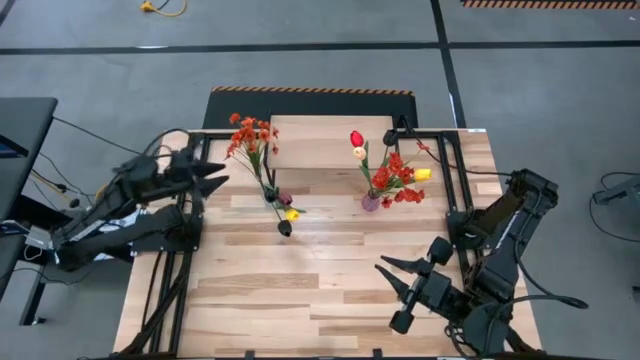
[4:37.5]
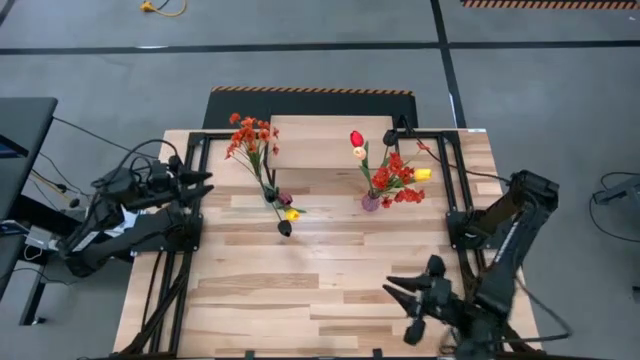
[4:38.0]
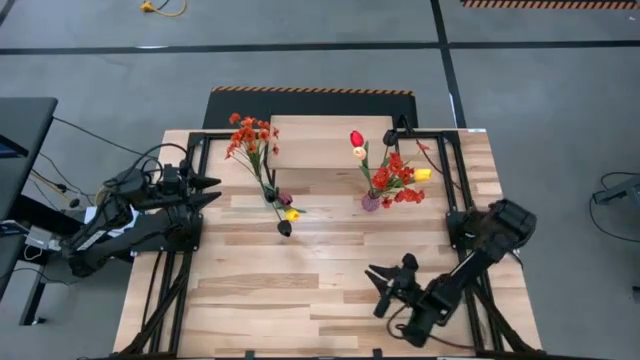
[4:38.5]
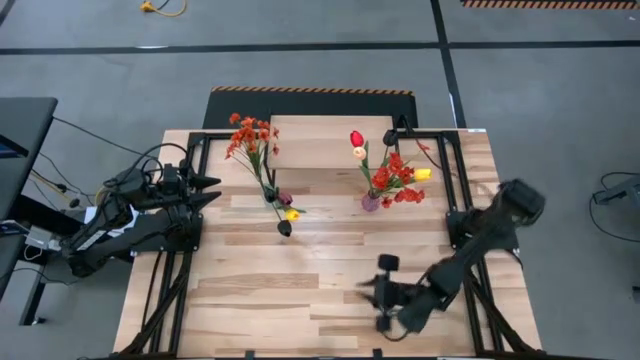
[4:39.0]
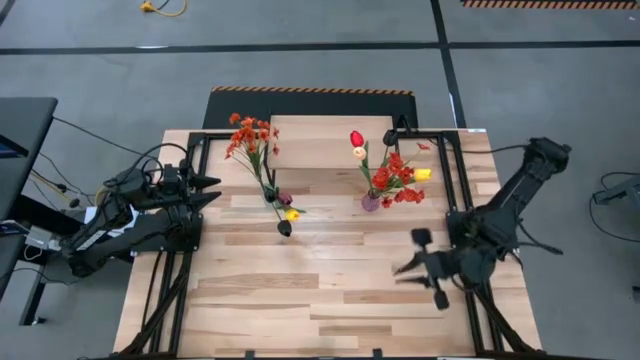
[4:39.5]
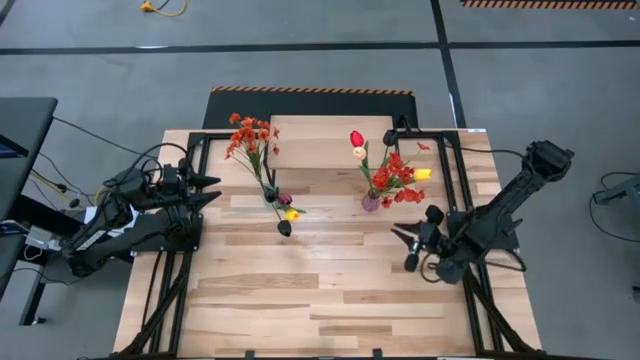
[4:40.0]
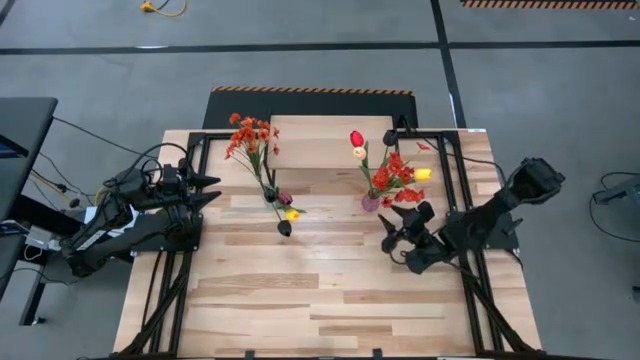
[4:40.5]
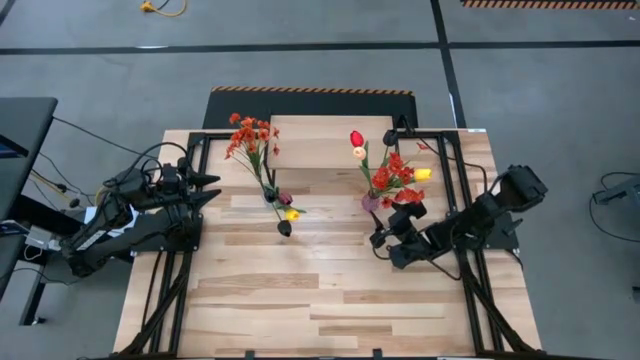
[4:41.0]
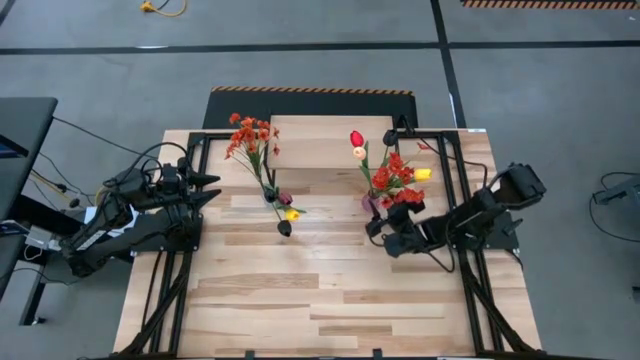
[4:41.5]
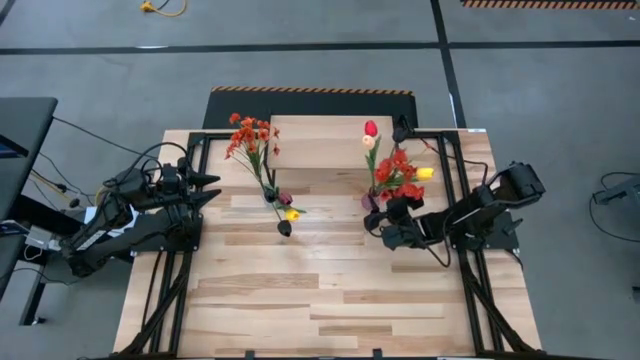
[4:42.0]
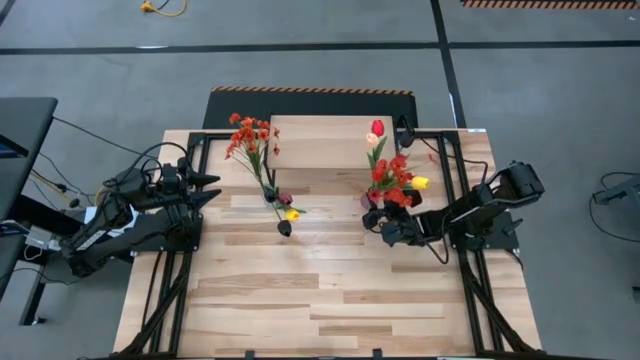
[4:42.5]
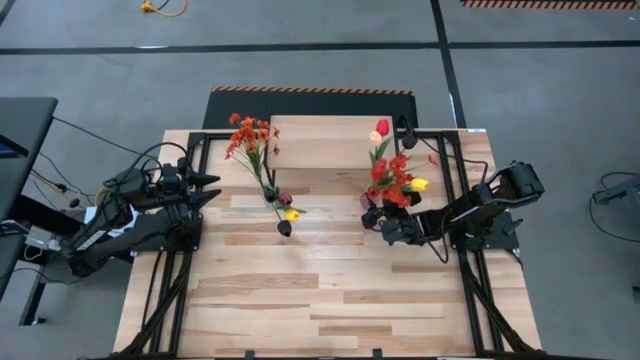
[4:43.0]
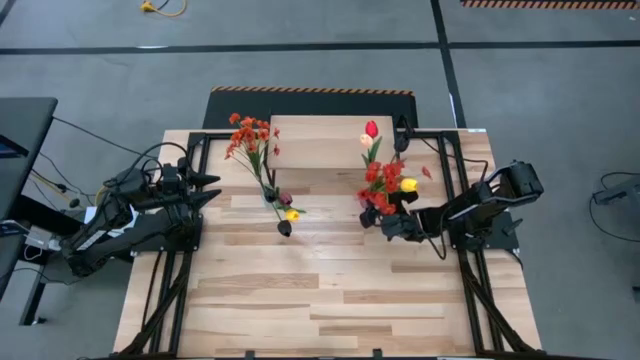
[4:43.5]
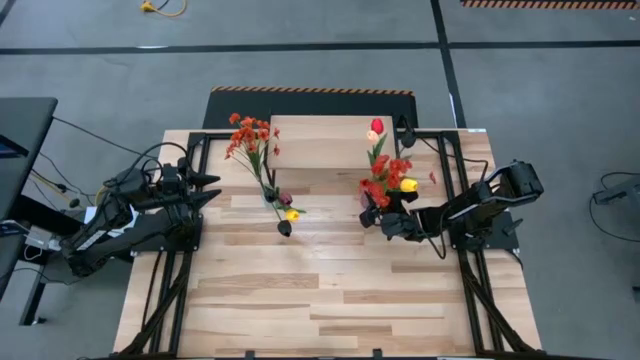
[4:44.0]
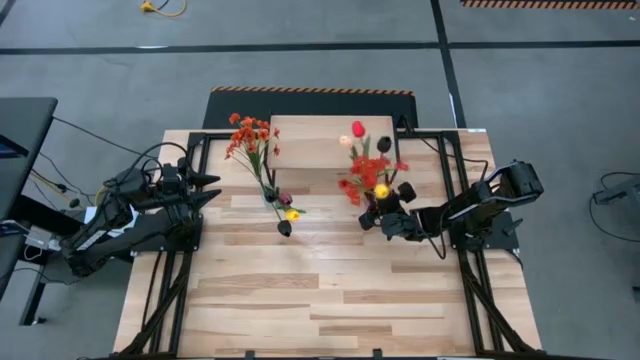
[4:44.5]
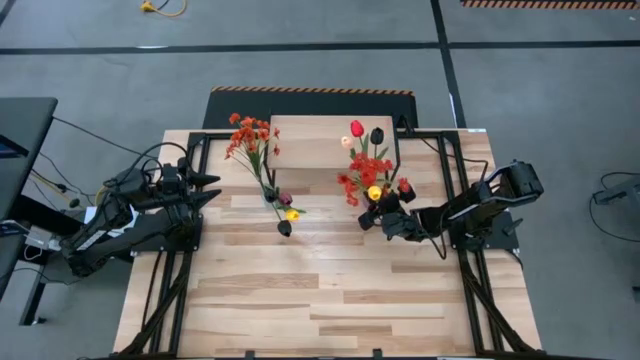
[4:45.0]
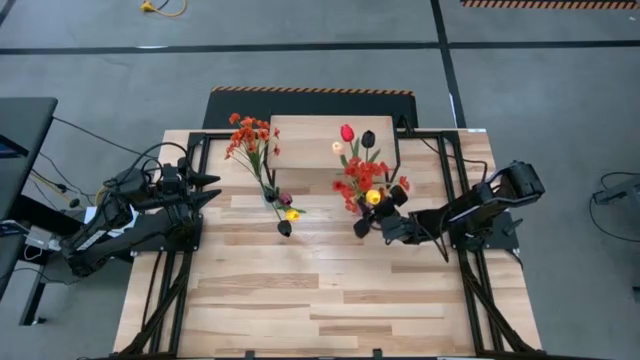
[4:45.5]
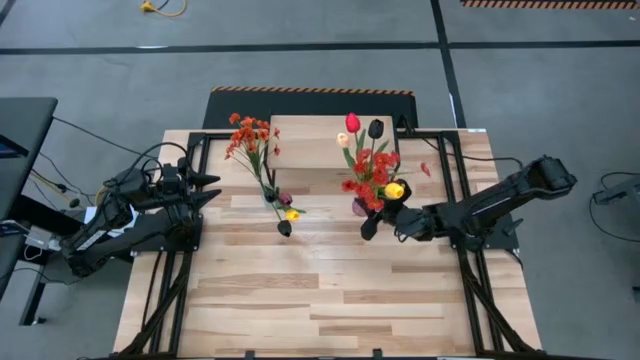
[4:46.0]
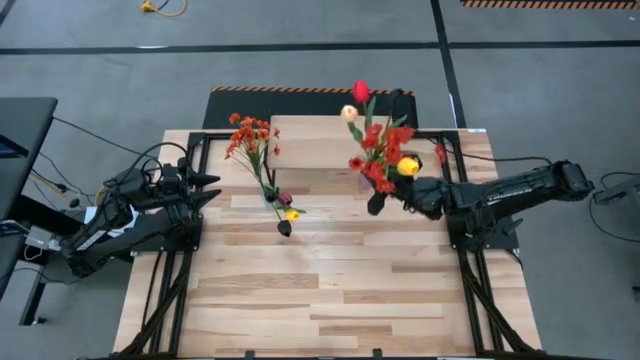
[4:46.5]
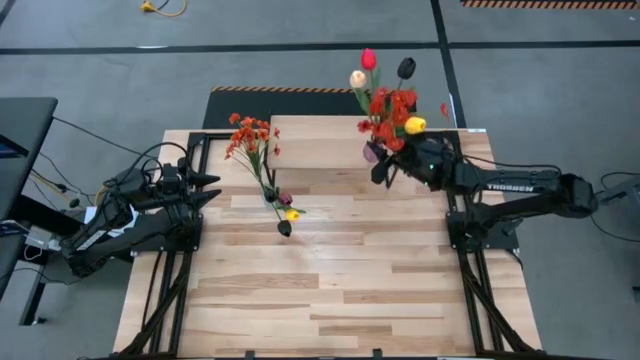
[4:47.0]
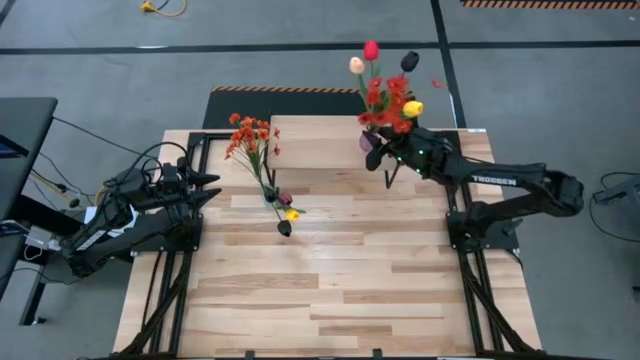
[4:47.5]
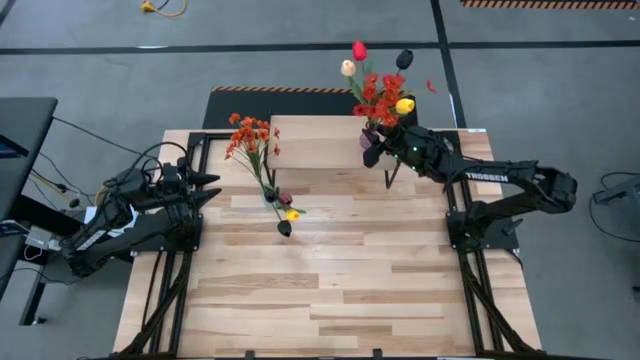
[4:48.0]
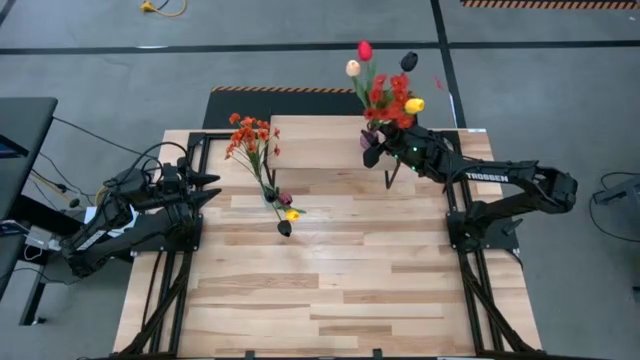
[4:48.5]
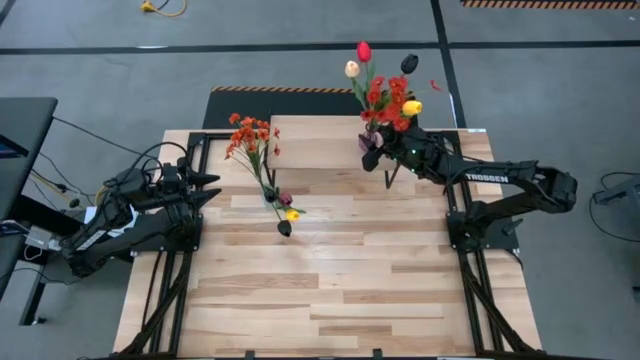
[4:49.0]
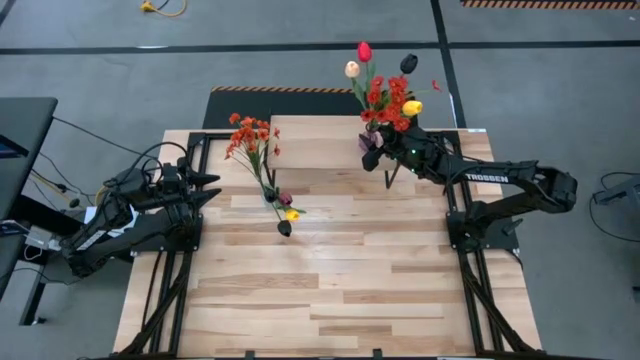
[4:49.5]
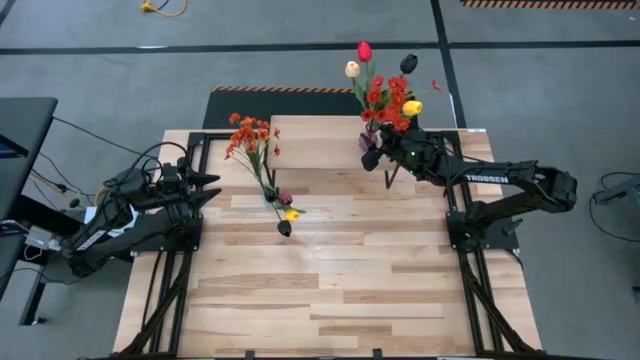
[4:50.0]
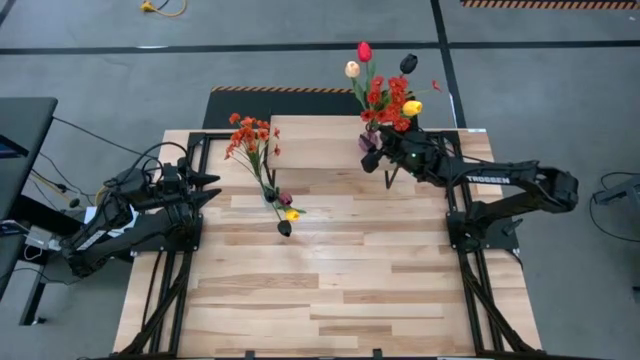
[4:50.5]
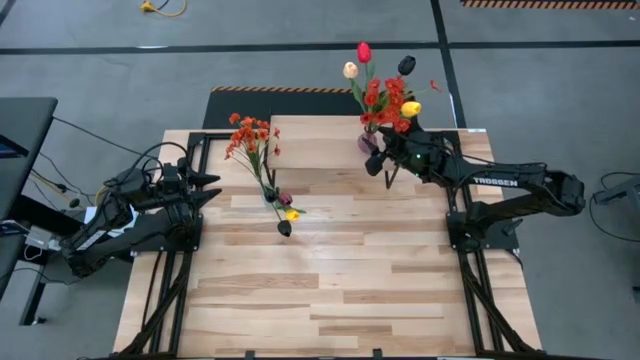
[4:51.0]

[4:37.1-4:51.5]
Task: Pick and place flowers into a vace then onto a shelf
Put the purple vase with the flowers on the shelf

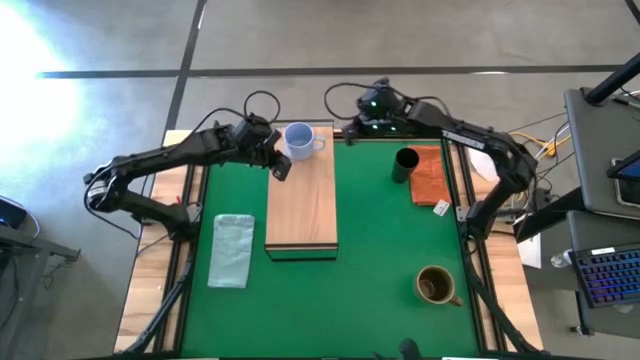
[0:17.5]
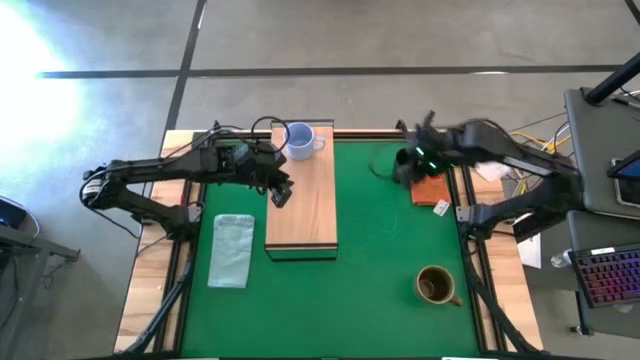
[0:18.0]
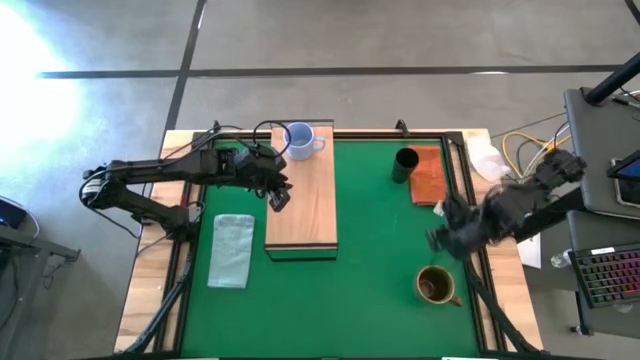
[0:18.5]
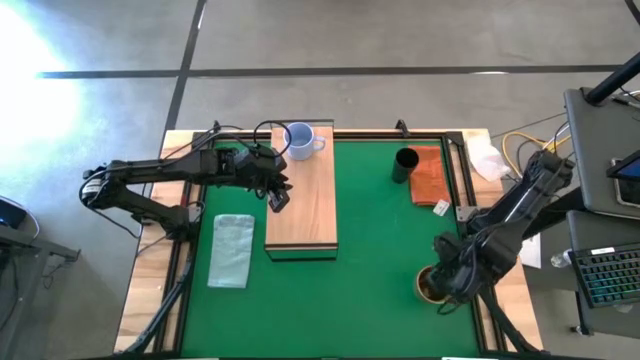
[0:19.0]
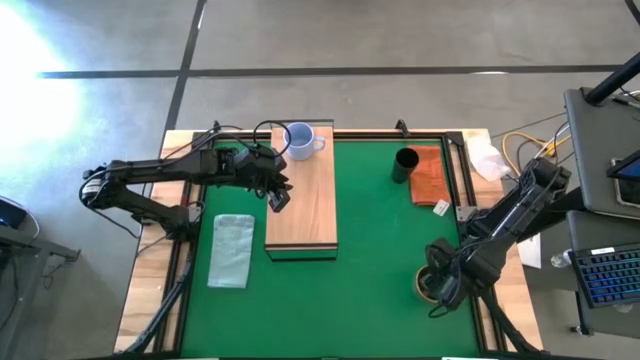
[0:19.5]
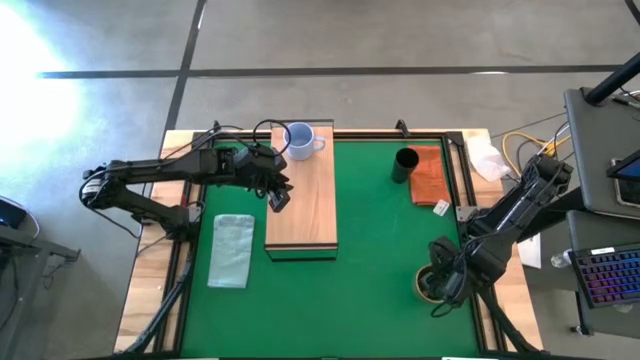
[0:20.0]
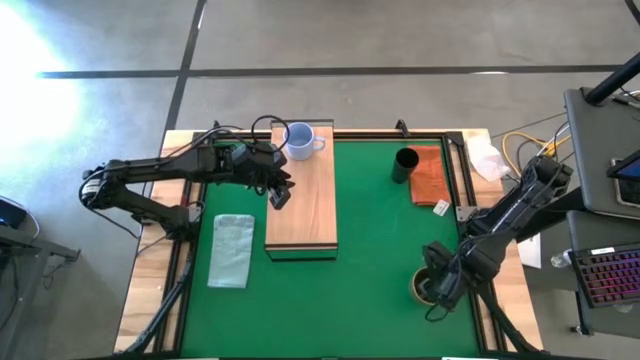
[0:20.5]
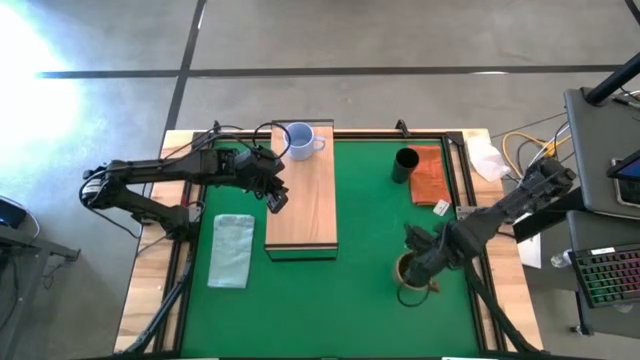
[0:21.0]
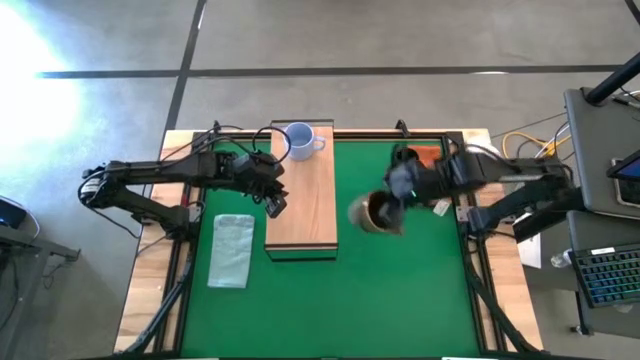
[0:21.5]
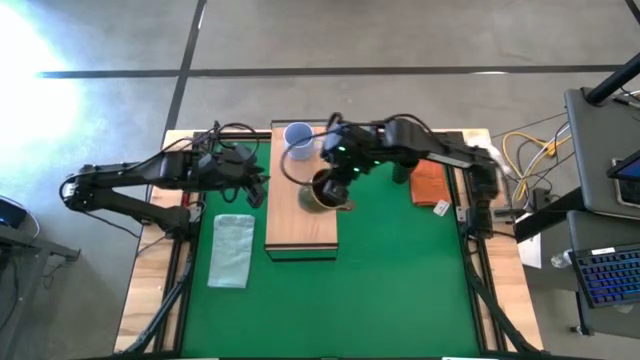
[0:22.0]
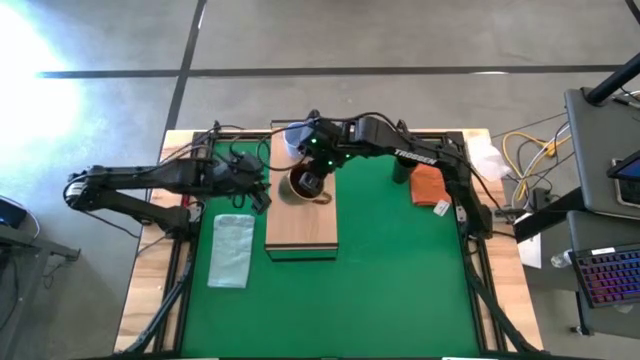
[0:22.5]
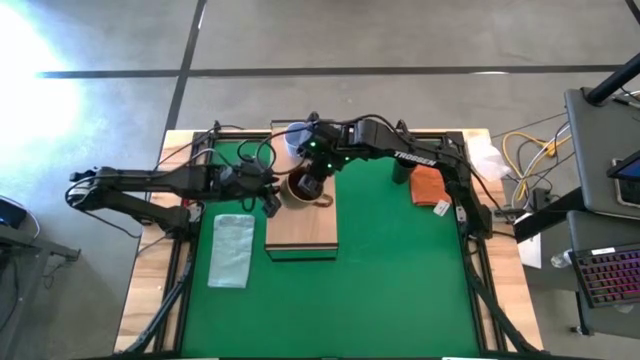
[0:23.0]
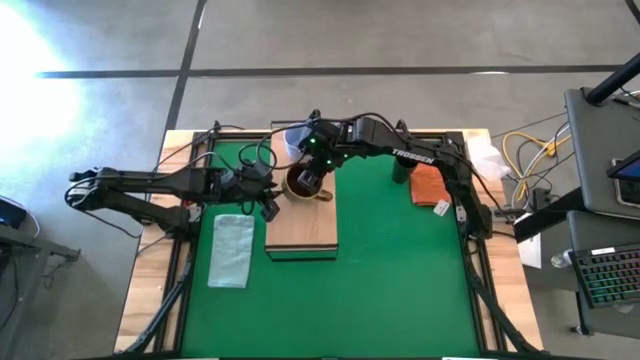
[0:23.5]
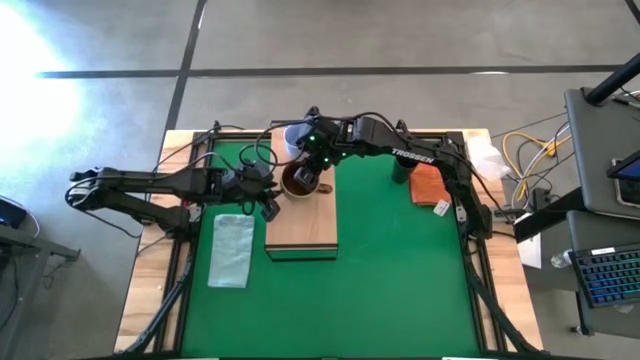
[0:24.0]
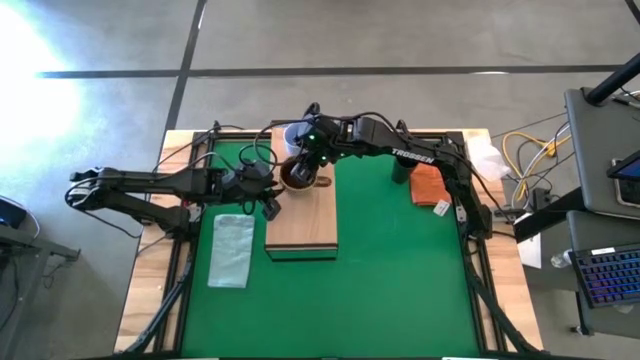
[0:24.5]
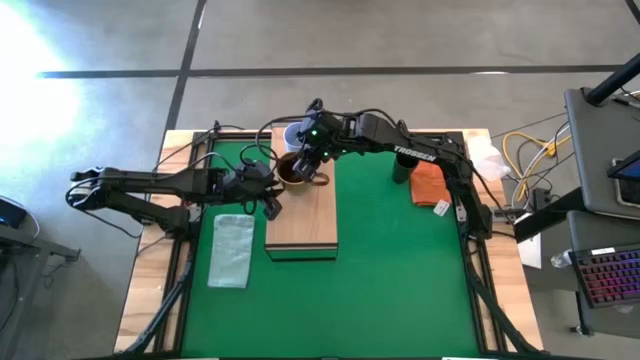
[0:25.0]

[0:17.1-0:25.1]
Task: Stack small to large cups/mugs on shelf
Put the green mug on the shelf
